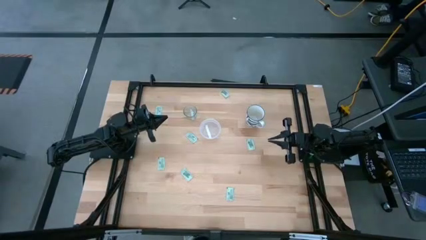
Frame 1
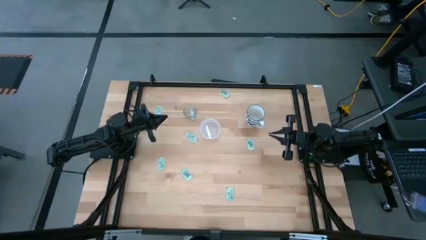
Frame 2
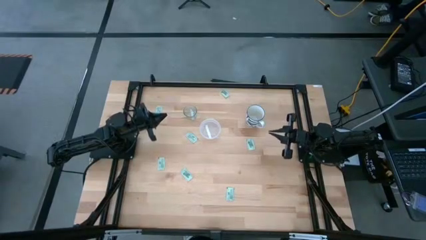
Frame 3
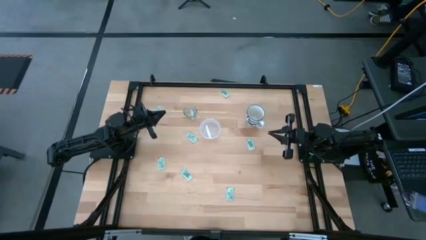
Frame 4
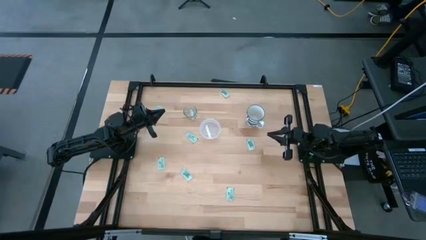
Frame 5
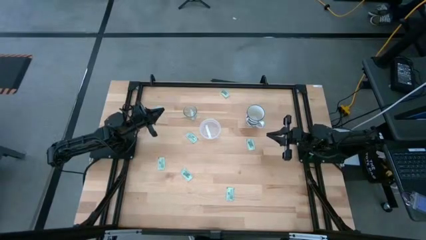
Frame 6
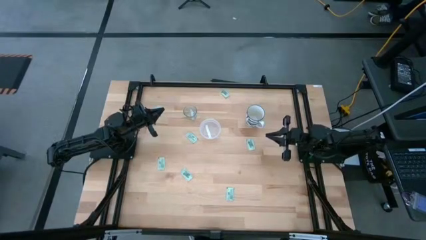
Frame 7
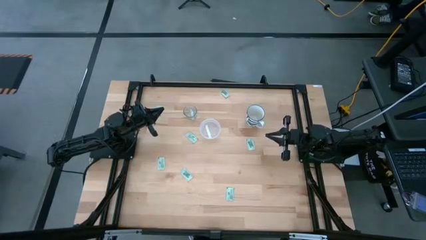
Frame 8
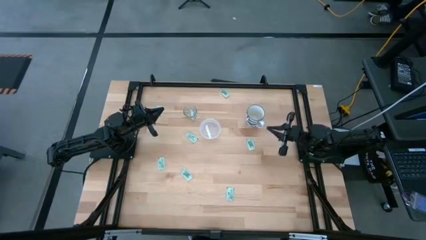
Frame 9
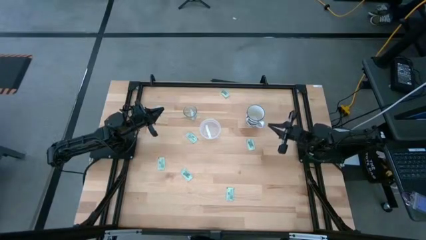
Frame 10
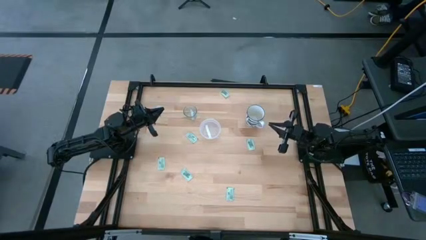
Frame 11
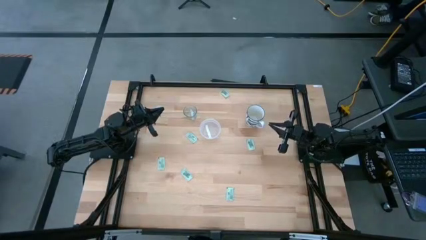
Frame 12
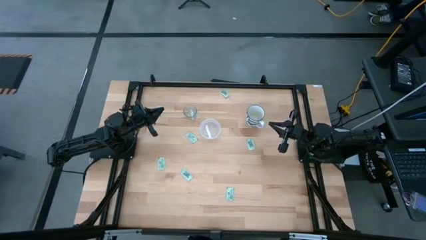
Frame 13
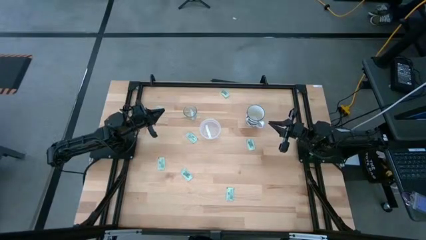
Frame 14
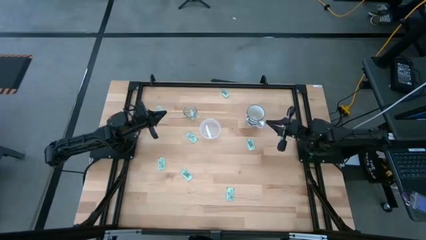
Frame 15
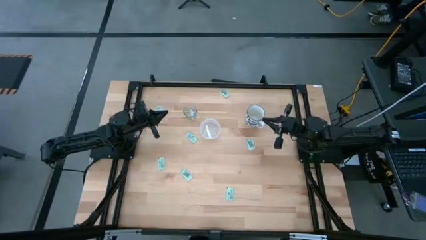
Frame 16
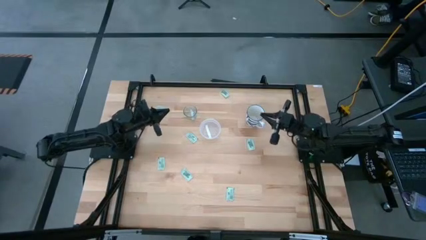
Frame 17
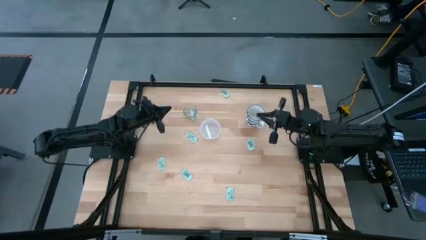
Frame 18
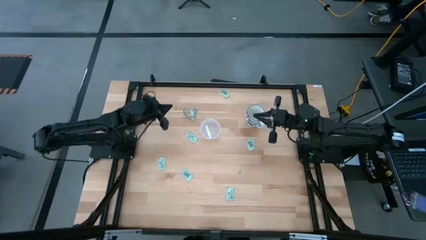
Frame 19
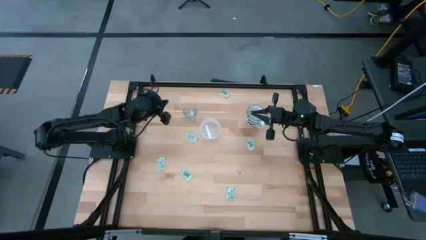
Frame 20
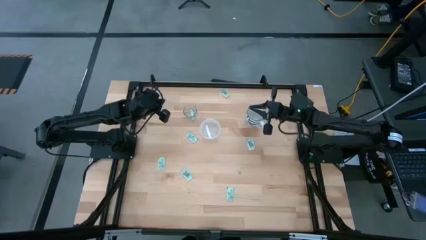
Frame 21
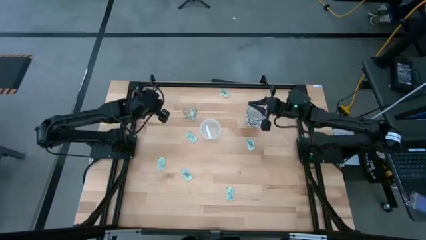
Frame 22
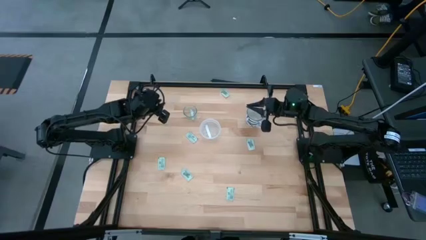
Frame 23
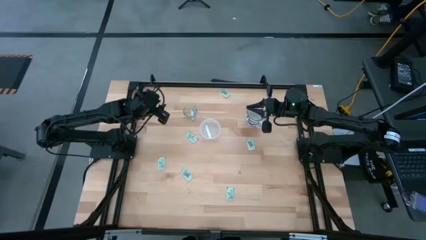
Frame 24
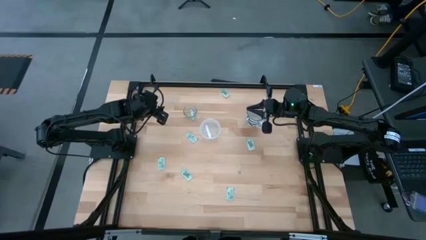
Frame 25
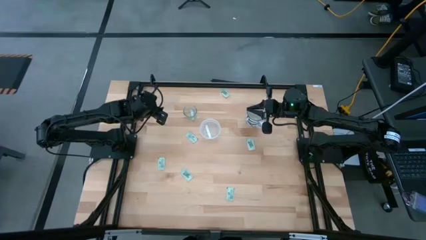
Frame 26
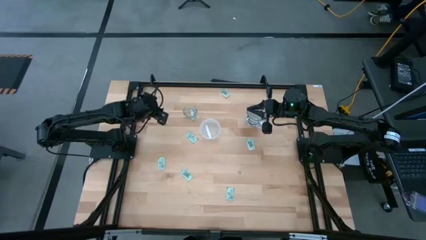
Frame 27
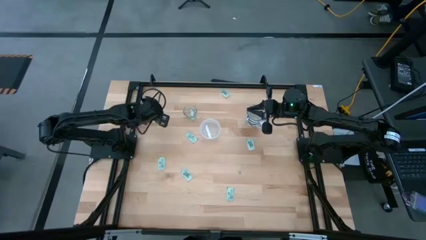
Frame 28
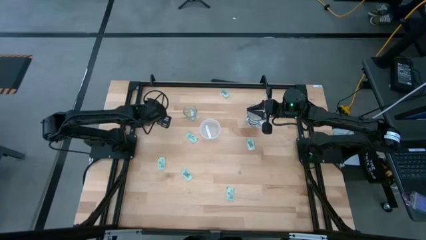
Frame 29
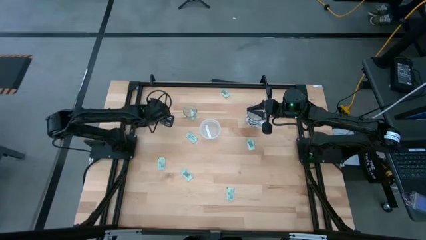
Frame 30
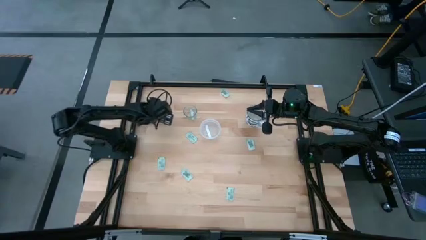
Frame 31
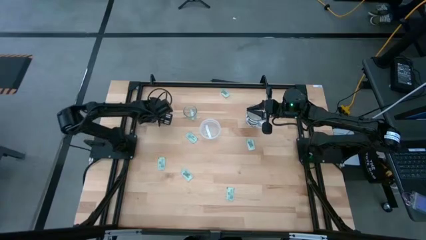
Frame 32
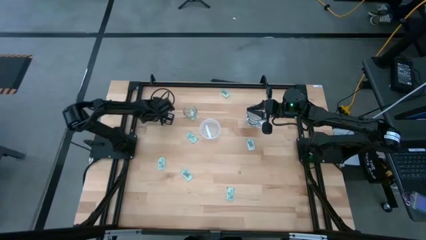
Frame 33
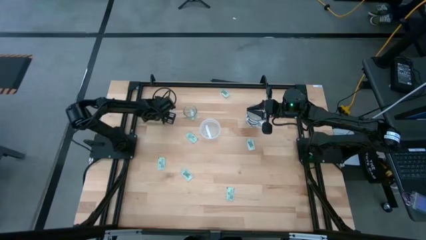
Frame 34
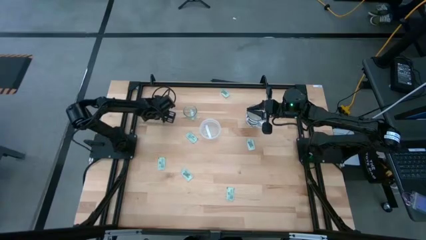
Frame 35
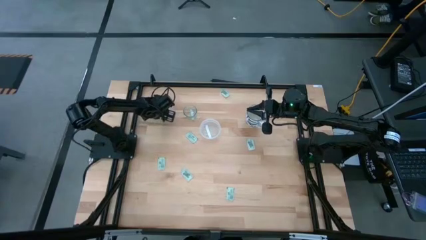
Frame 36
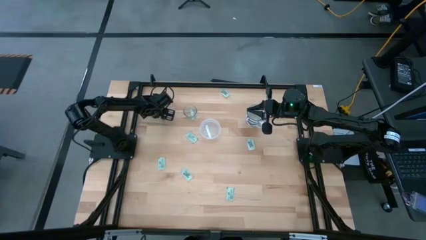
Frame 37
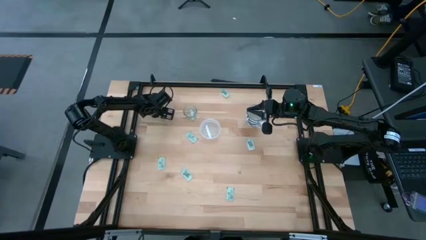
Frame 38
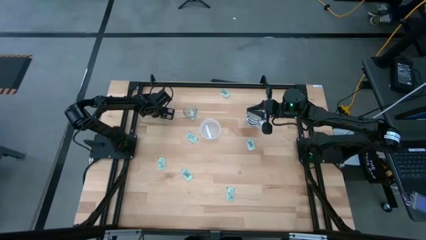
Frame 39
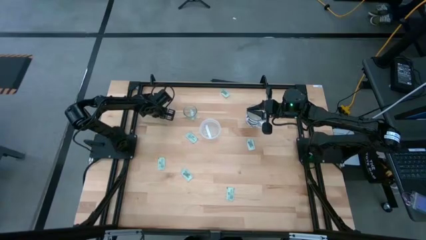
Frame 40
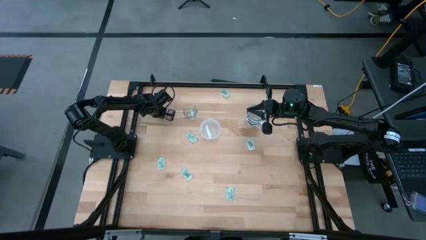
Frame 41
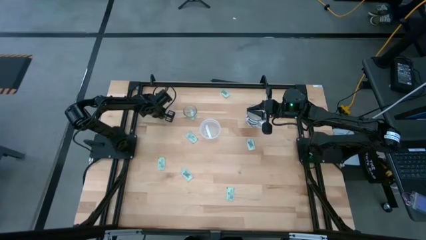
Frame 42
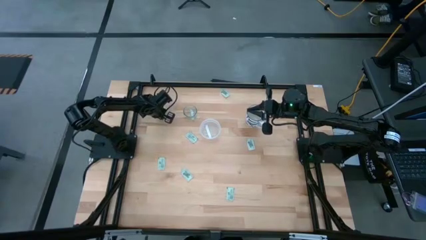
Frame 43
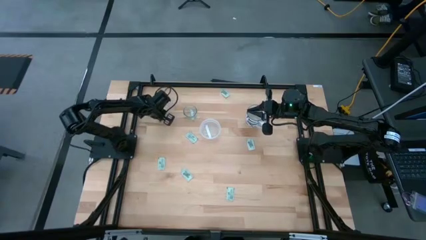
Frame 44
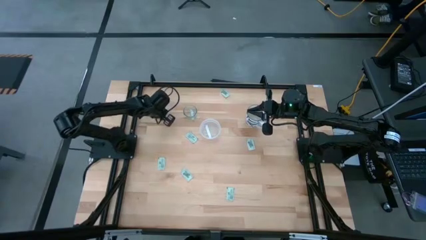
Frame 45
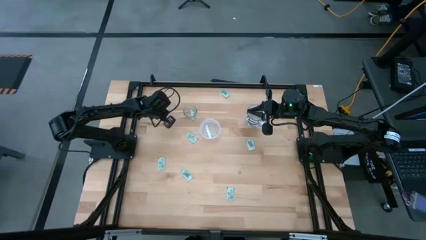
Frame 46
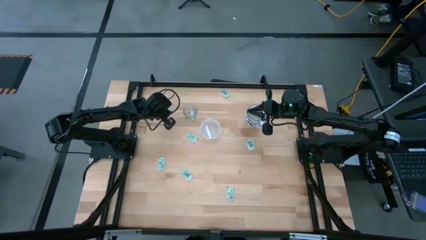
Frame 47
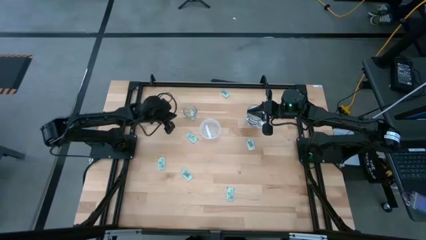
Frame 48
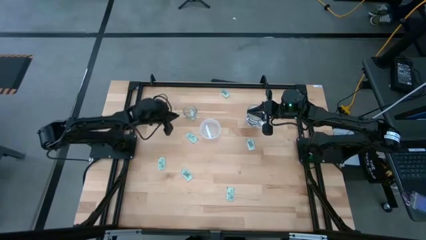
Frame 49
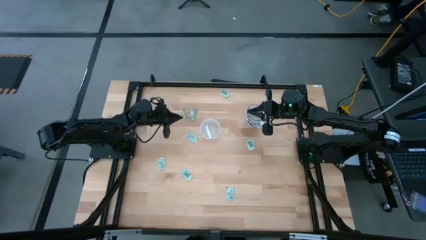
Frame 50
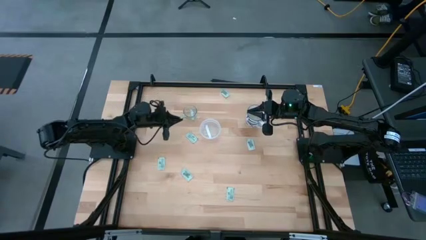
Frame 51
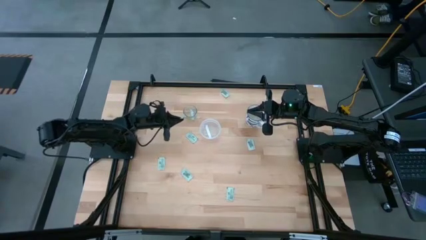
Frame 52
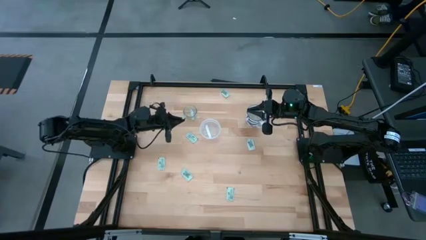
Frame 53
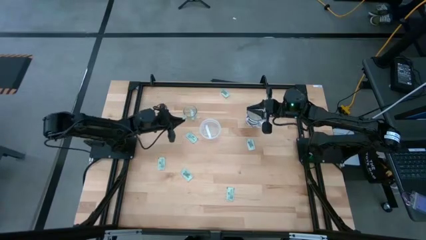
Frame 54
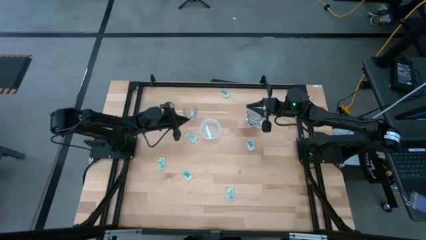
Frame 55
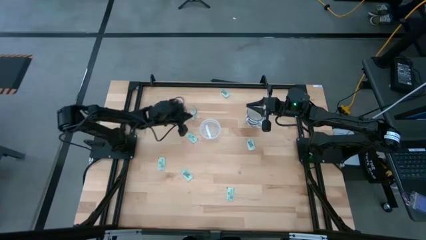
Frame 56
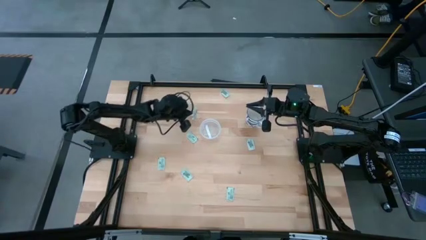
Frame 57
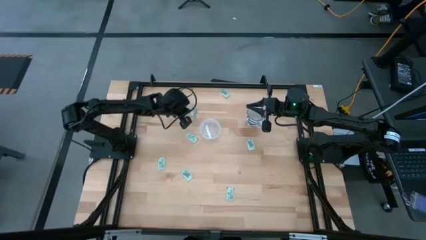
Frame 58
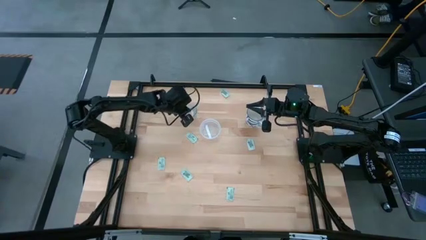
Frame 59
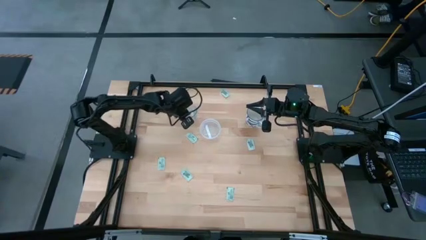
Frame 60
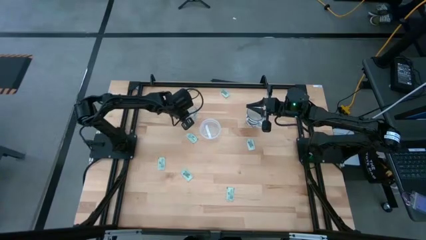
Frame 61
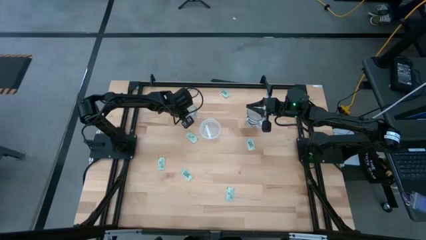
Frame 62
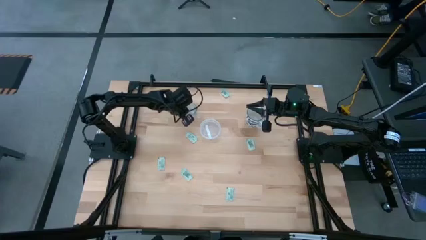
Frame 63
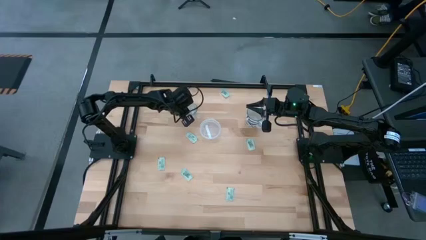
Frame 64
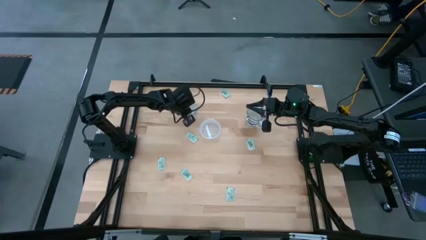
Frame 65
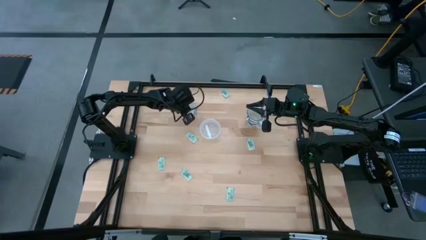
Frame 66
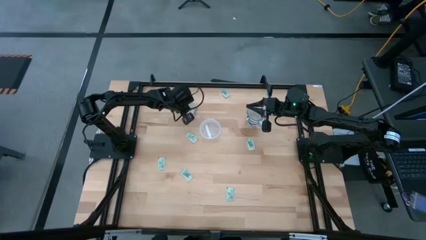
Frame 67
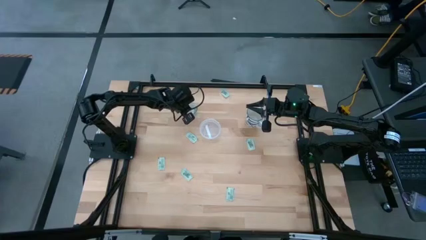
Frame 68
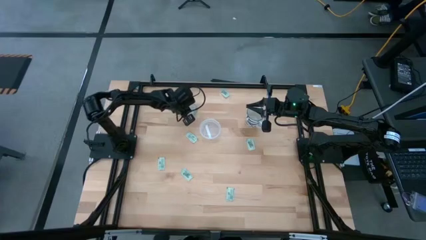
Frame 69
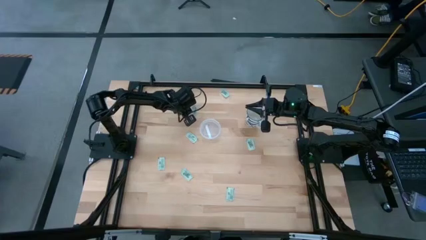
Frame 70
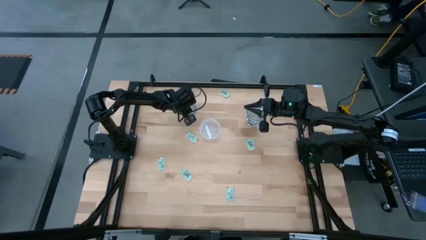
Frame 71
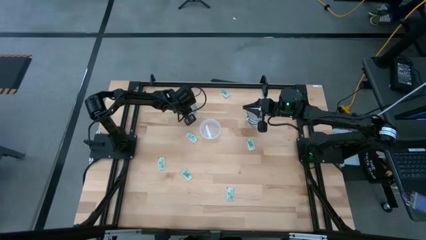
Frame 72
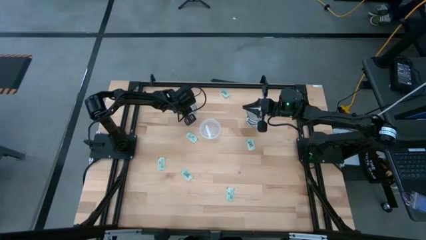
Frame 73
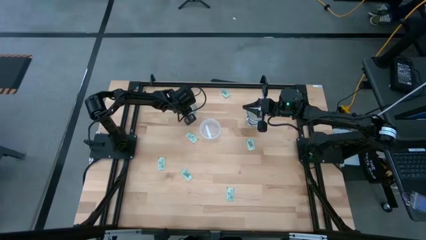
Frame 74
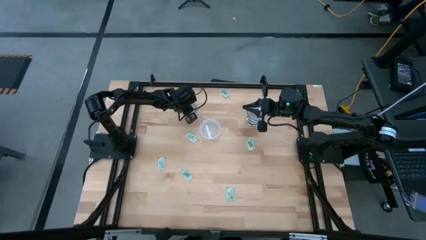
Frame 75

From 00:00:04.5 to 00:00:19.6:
Task: Pick and place Stevia / Truvia into bins
Put the stevia packet into the glass container
